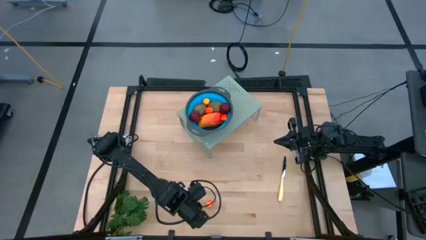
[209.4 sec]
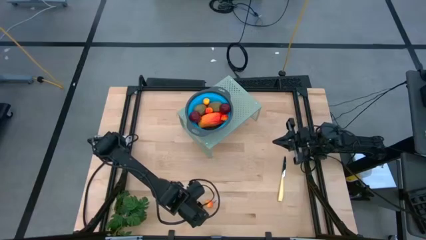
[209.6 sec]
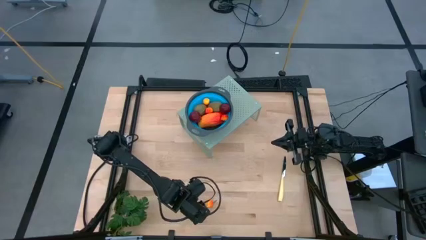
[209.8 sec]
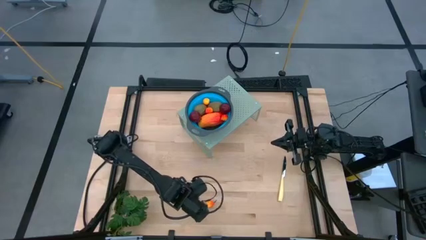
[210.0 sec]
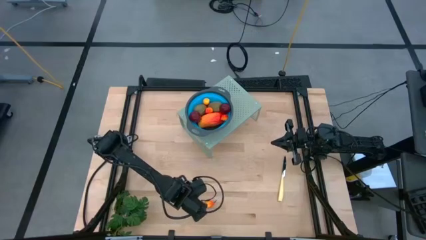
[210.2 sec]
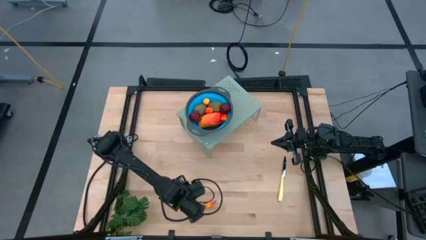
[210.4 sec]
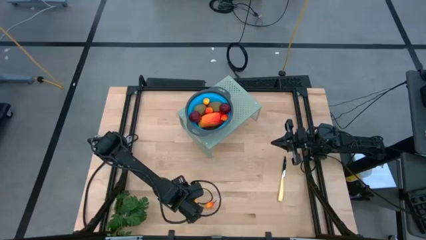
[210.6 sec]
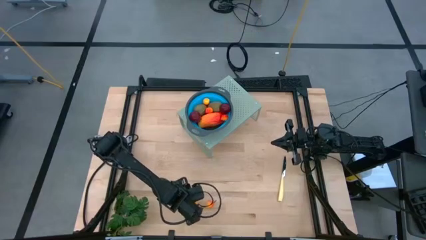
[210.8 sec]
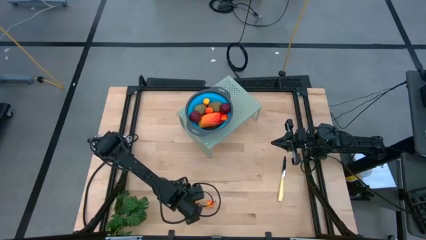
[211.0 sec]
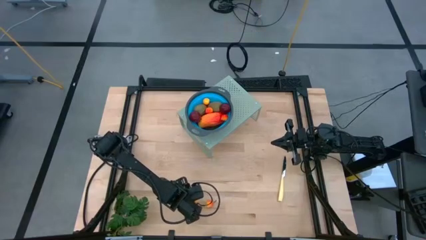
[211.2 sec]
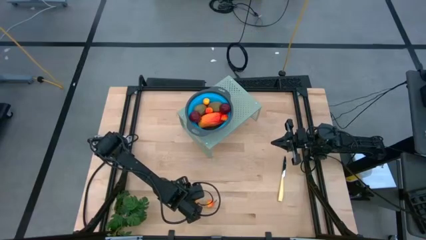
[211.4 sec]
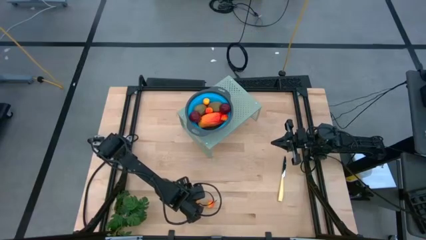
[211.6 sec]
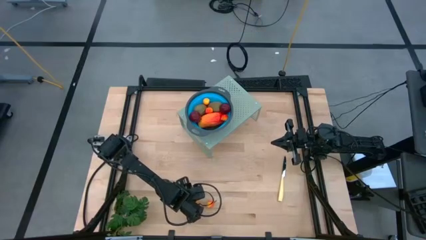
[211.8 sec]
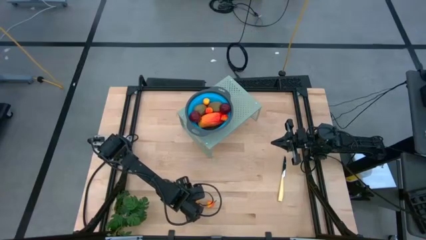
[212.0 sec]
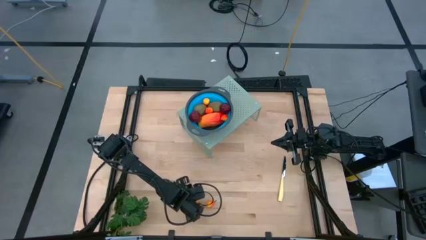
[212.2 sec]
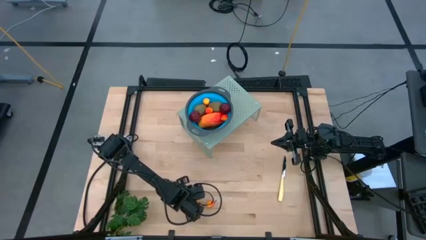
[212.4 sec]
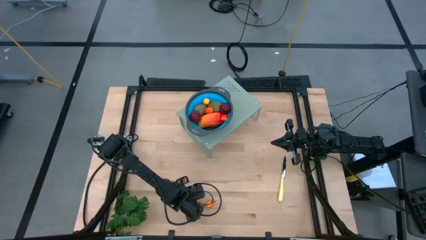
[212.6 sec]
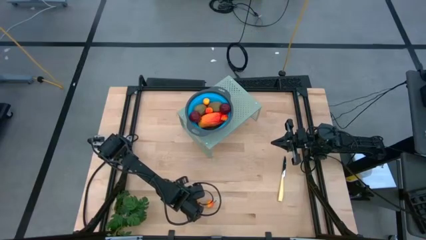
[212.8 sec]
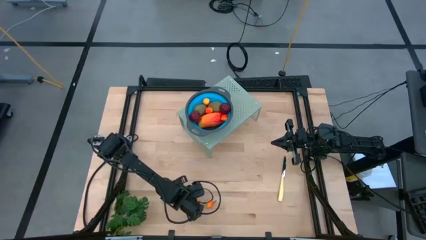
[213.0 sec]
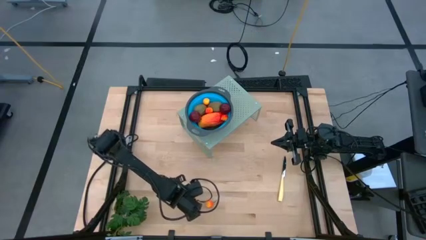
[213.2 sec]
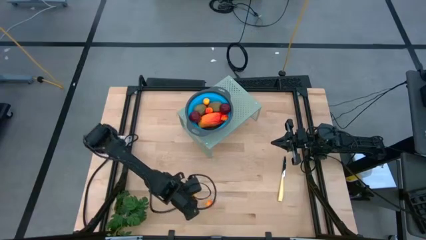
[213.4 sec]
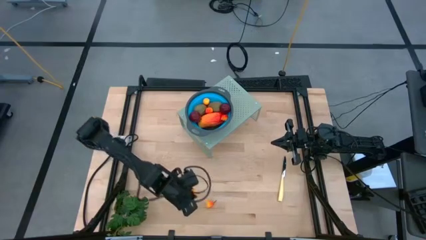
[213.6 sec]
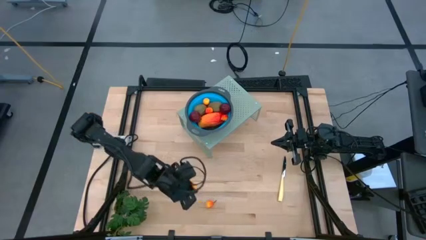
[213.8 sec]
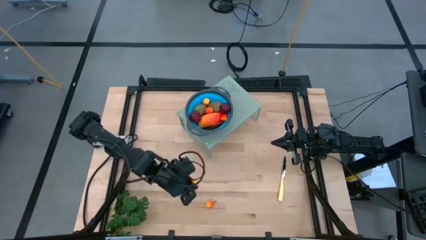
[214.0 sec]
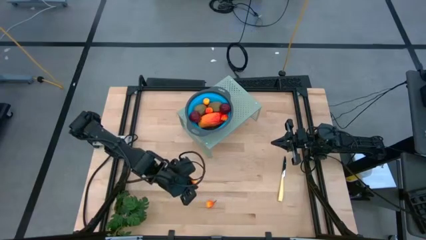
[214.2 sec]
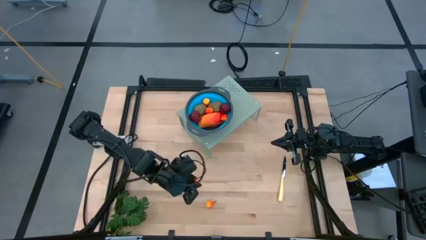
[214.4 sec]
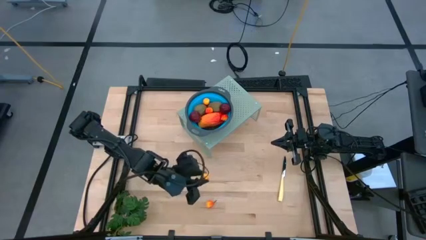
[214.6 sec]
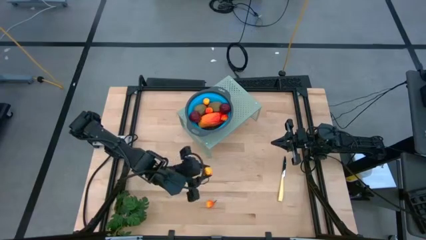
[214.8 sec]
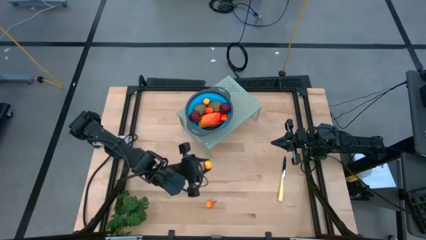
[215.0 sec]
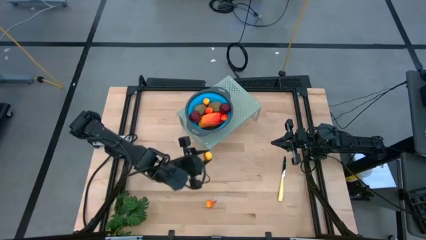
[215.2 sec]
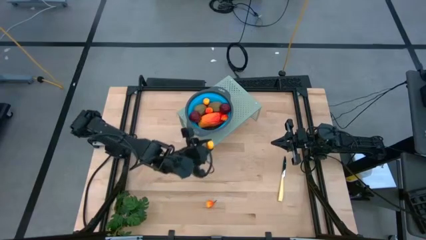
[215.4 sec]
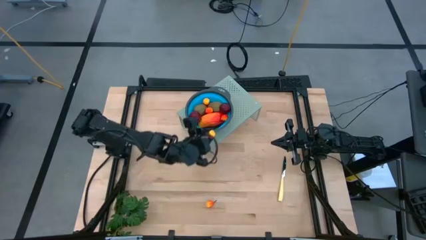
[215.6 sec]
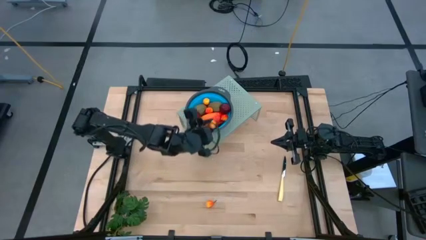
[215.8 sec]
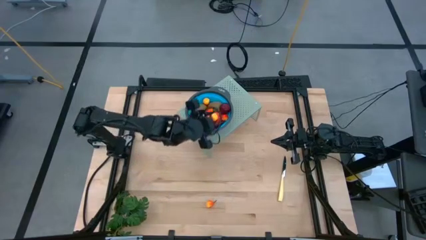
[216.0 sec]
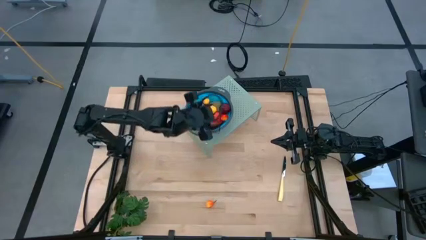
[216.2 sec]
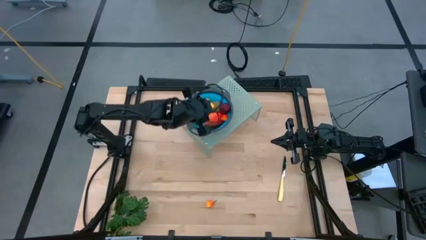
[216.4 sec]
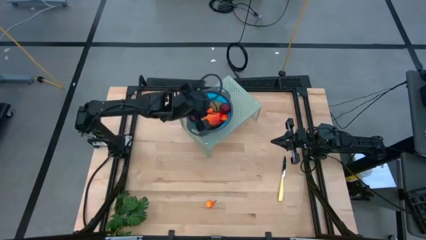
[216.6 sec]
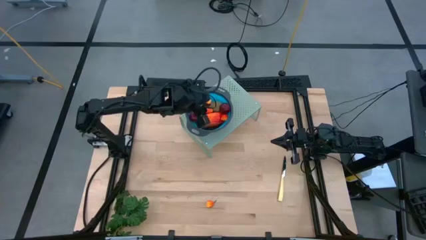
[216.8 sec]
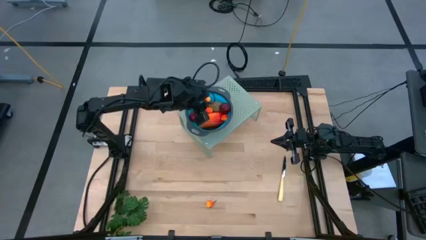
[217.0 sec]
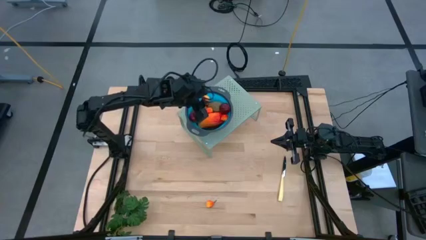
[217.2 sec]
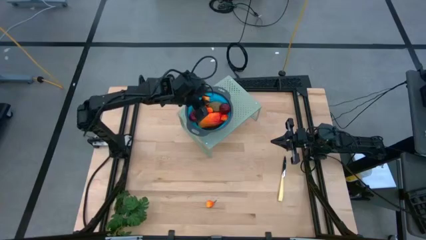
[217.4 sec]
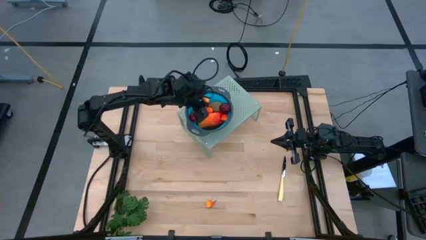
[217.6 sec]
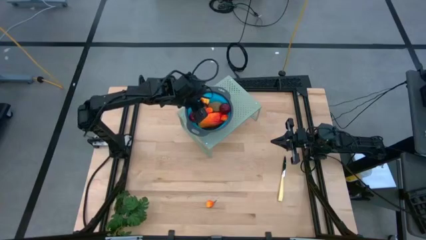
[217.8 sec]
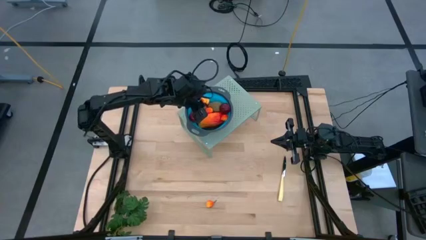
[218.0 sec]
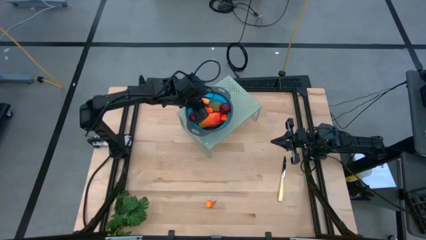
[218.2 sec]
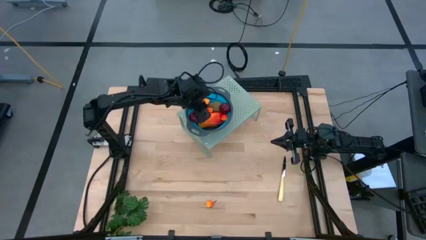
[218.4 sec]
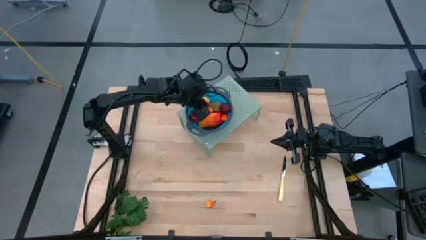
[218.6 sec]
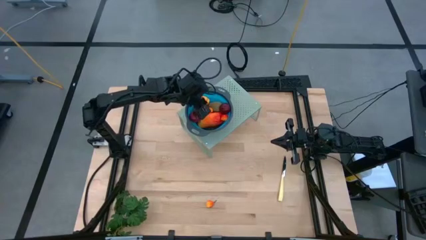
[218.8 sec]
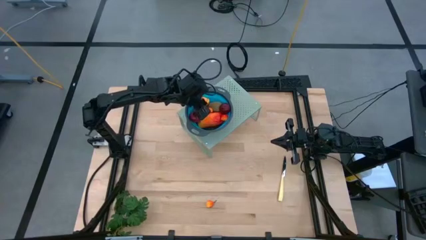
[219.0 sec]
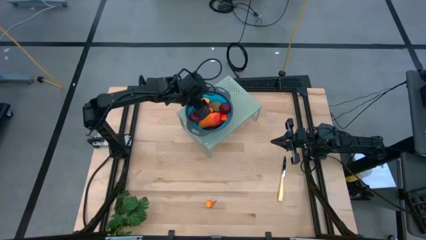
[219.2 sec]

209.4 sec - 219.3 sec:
Task: Pick & Place Fruit
Put the red yellow peach into the blue strainer bowl on the shelf
